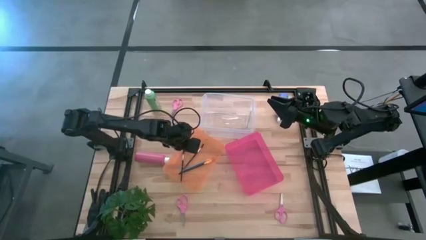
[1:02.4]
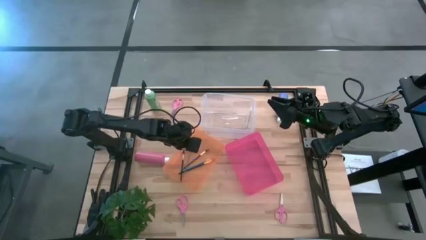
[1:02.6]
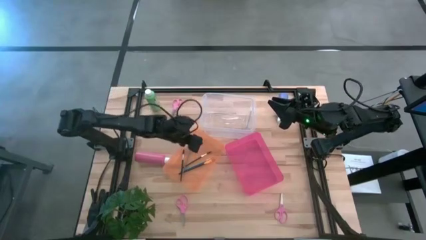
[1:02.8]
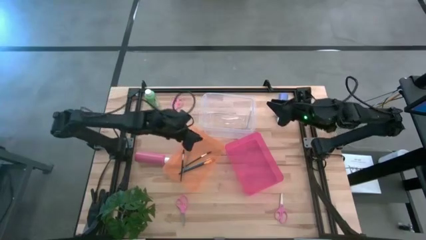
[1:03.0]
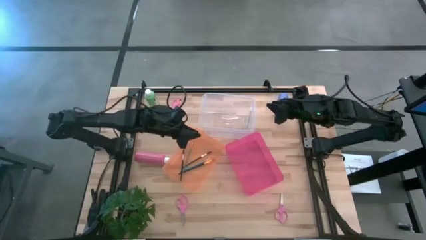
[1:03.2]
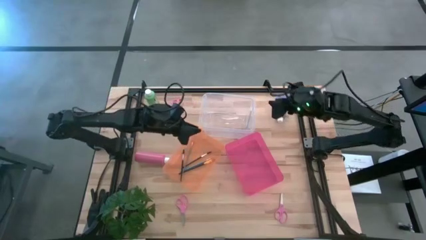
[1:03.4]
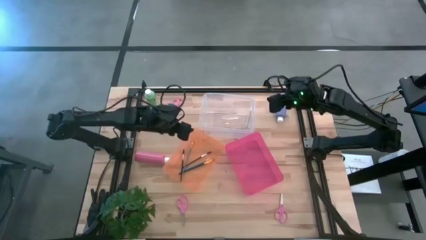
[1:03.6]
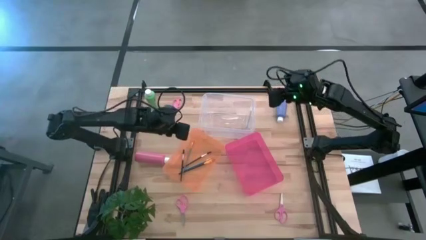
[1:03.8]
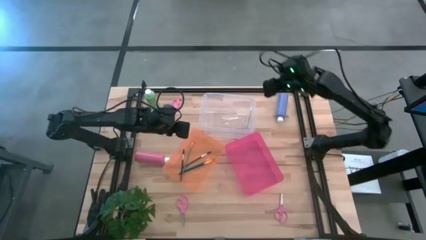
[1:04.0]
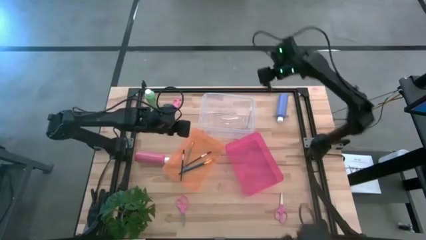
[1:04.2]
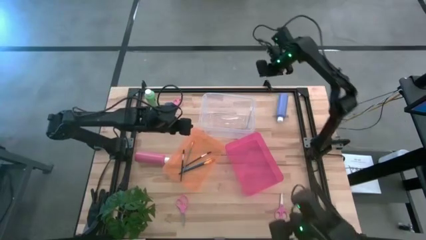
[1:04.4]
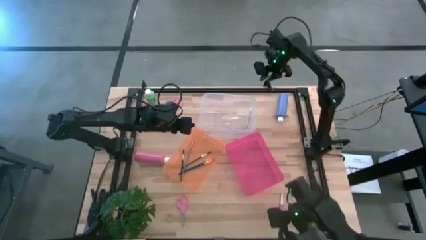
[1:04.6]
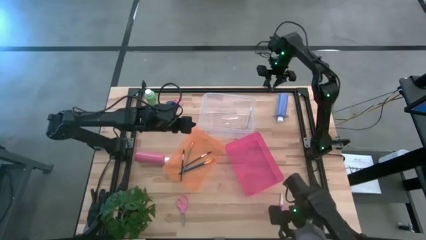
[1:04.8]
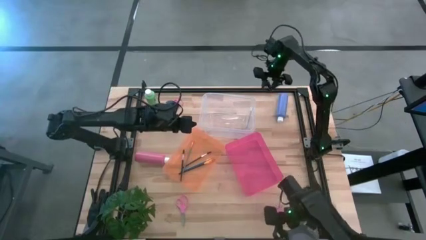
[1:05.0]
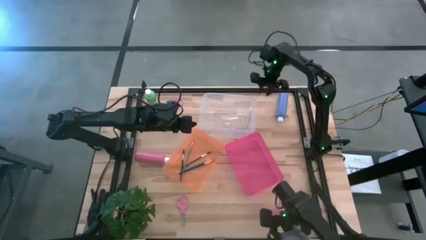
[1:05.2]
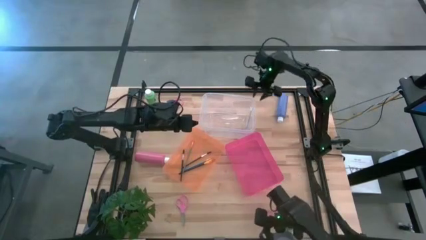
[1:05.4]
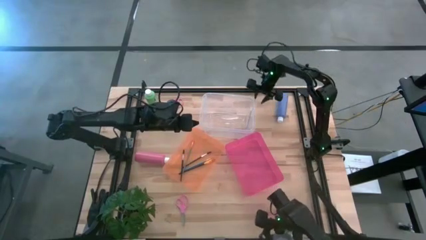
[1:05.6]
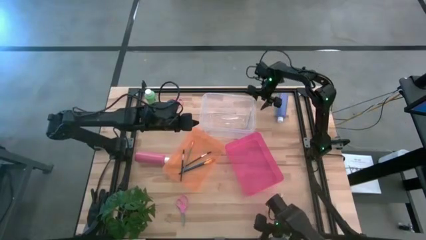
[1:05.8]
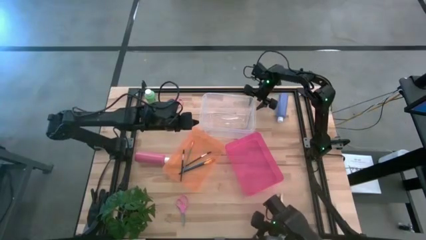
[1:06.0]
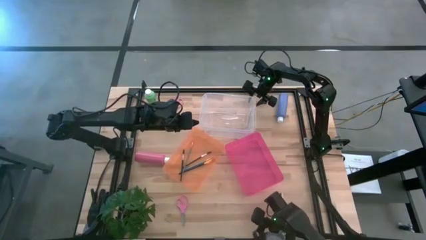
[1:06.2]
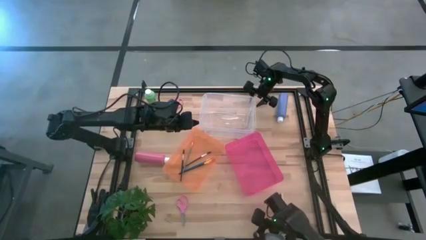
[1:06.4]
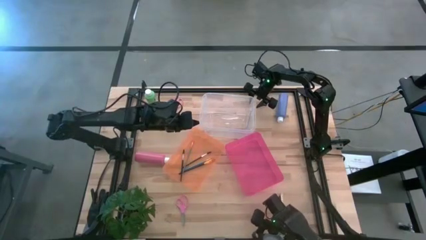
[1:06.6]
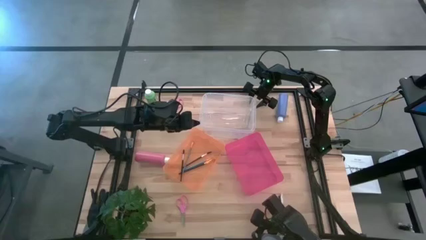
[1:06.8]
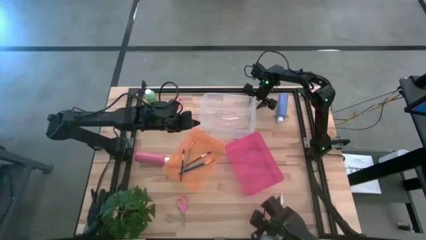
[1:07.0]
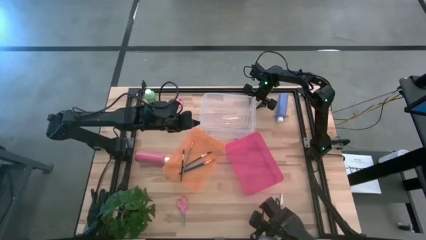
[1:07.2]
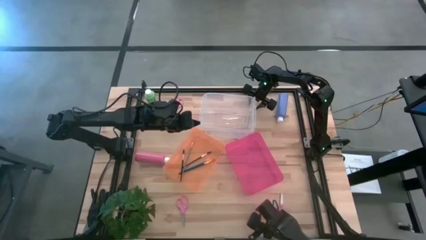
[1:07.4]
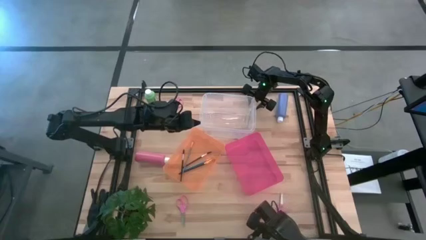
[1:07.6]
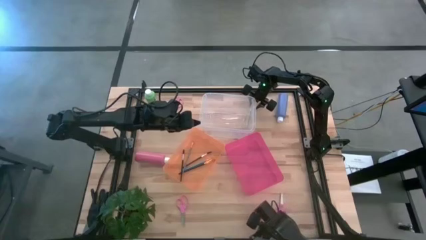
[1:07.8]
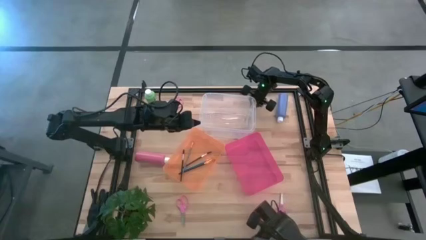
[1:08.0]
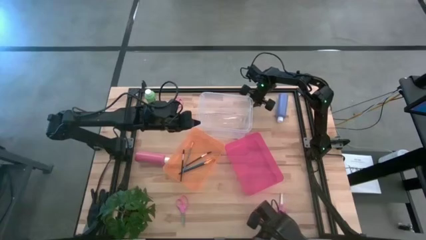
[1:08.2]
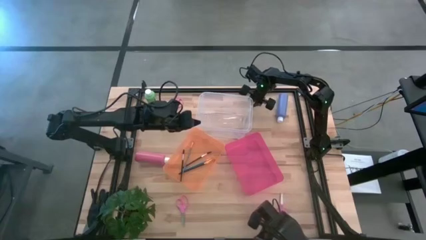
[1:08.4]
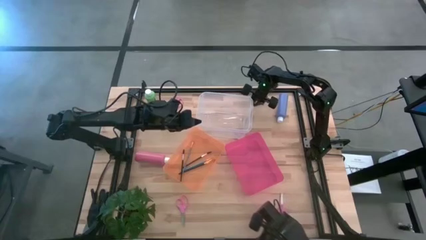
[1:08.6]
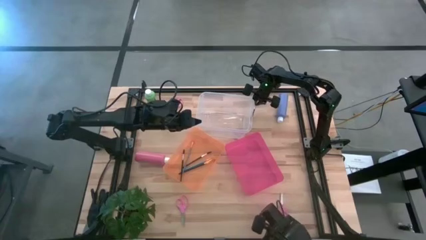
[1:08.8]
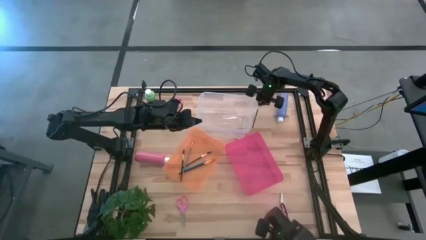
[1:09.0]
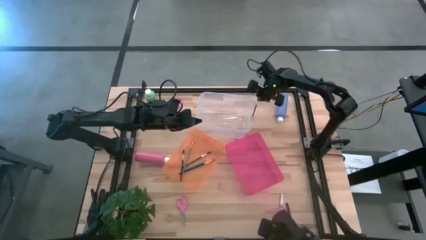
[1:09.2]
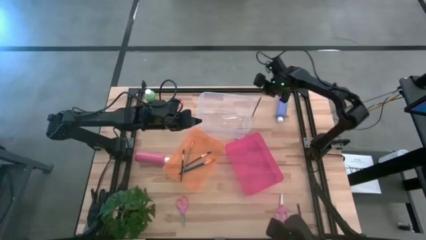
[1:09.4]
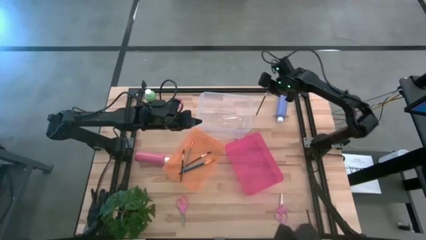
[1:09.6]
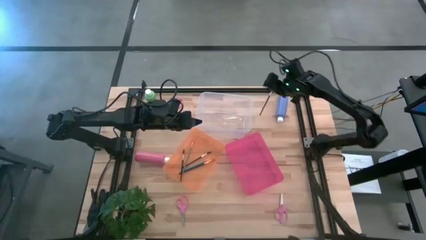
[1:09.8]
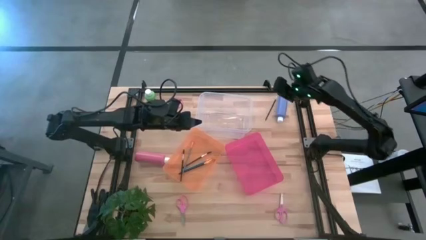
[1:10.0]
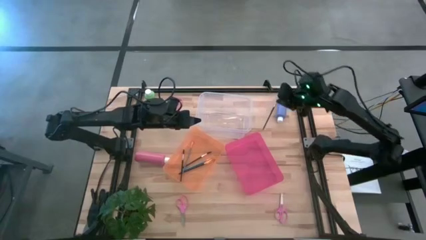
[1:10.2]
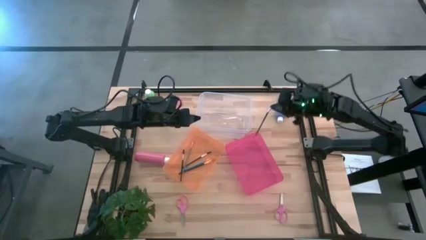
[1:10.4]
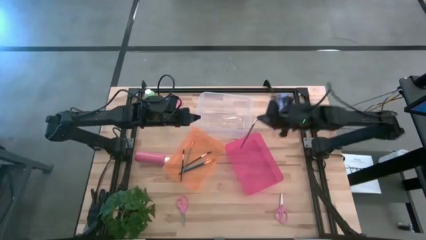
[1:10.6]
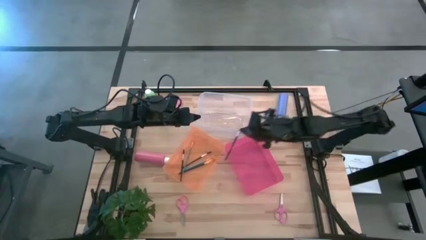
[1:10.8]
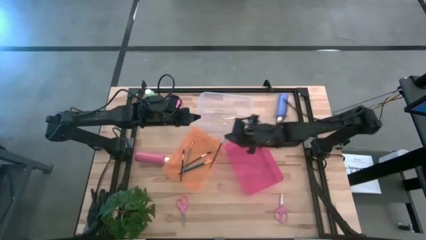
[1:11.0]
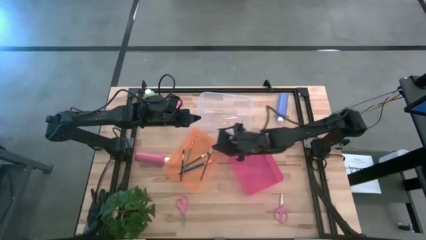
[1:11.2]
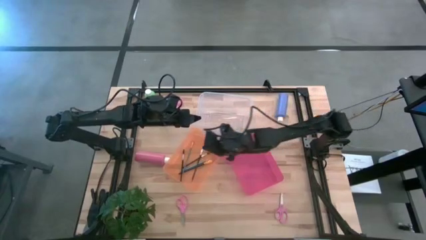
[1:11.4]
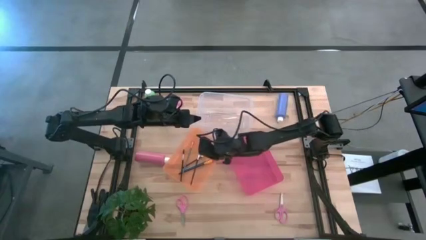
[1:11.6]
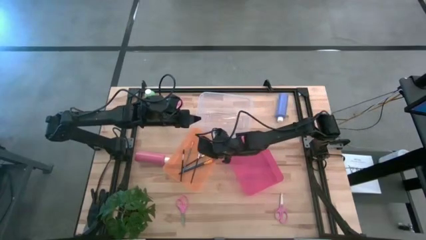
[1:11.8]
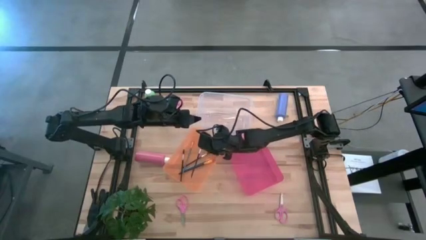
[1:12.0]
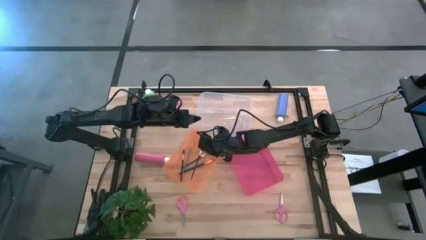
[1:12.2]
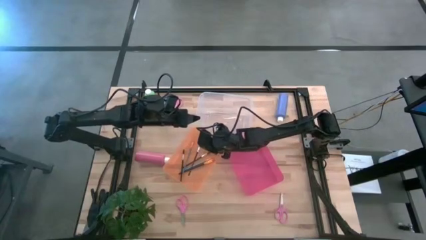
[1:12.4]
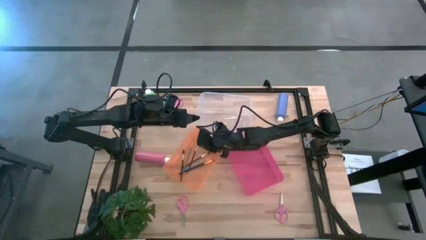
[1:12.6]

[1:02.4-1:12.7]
Task: Pick & Place Paint Supplies
Put the black eyeshadow brush into the orange bin

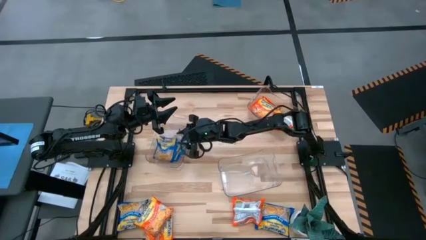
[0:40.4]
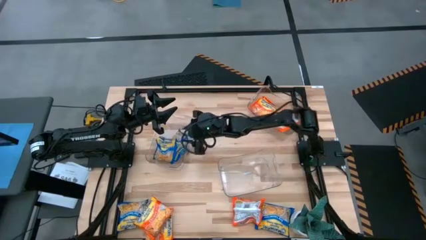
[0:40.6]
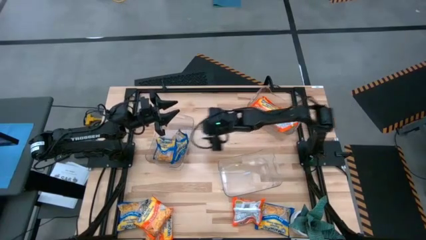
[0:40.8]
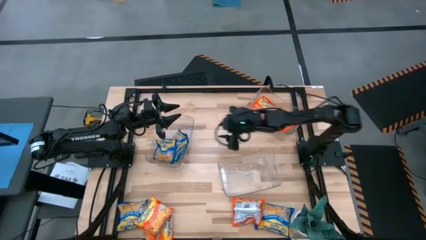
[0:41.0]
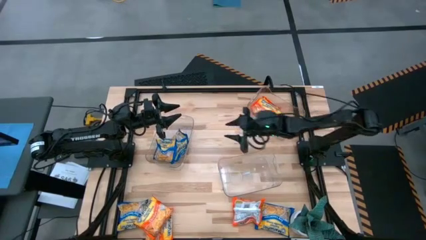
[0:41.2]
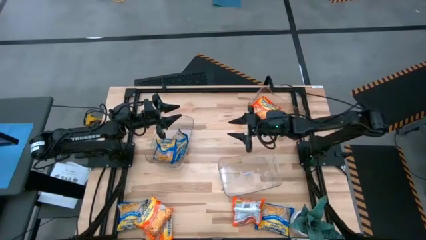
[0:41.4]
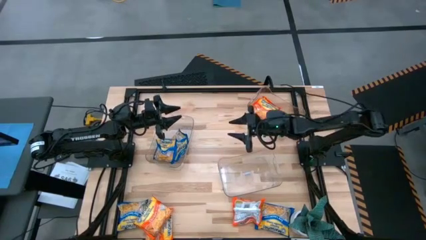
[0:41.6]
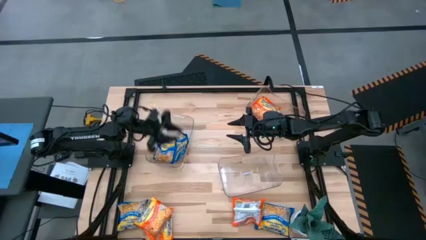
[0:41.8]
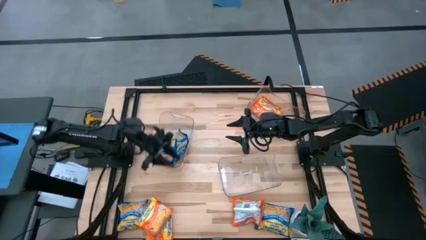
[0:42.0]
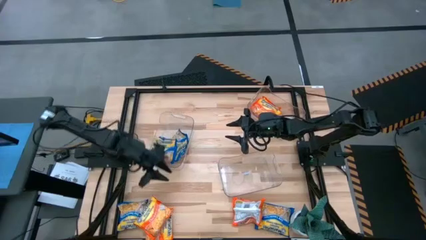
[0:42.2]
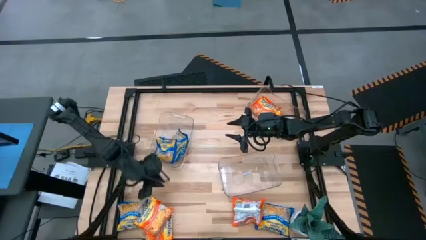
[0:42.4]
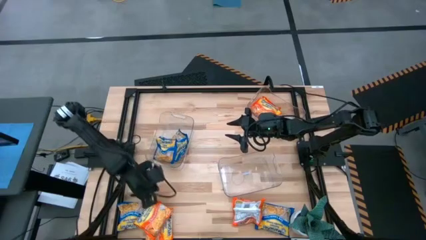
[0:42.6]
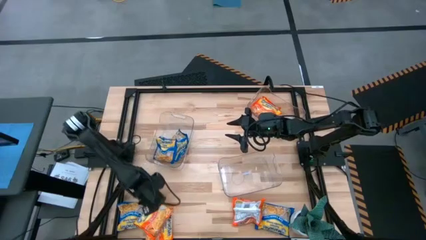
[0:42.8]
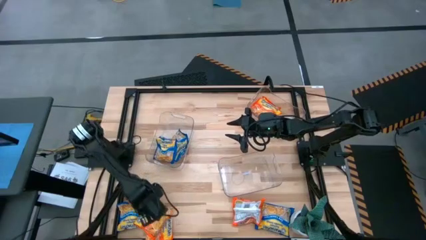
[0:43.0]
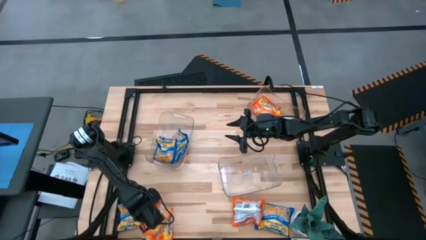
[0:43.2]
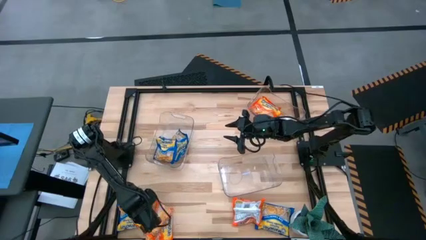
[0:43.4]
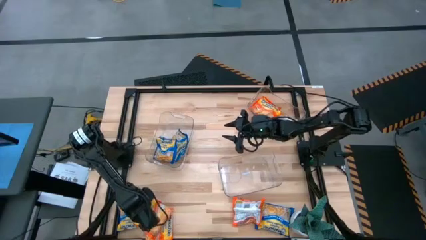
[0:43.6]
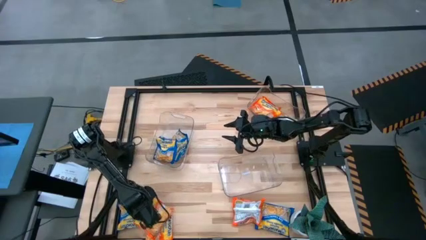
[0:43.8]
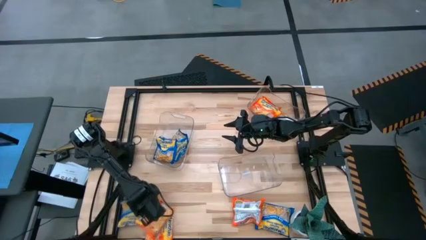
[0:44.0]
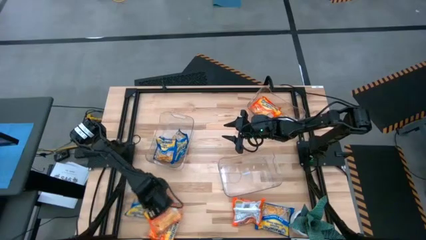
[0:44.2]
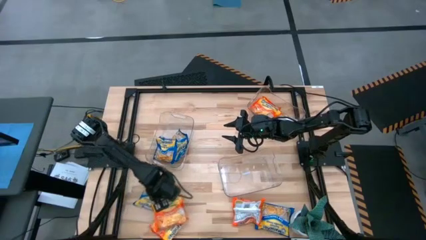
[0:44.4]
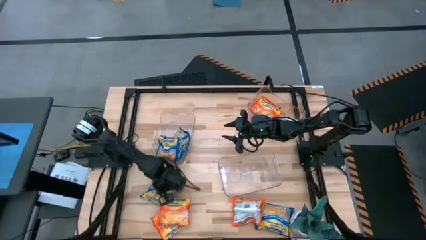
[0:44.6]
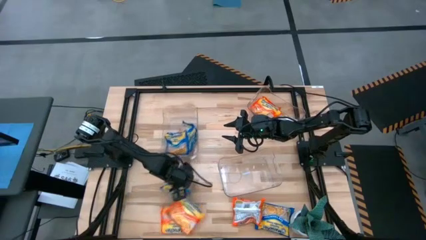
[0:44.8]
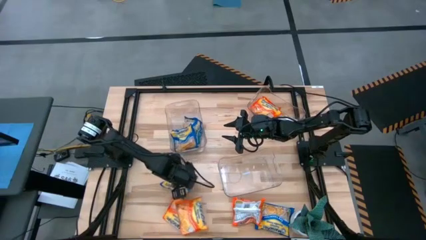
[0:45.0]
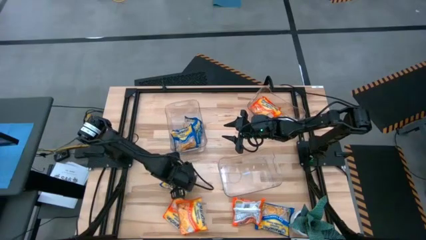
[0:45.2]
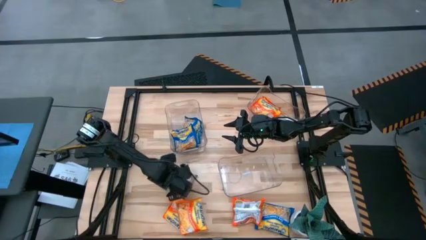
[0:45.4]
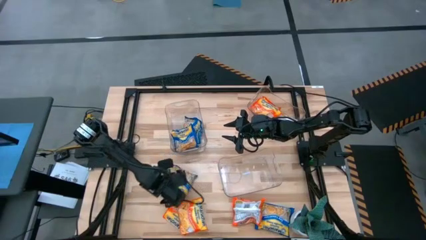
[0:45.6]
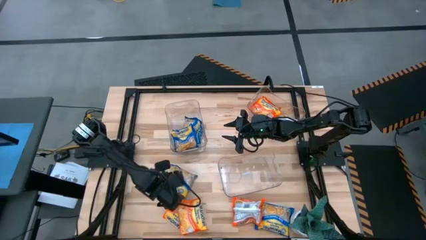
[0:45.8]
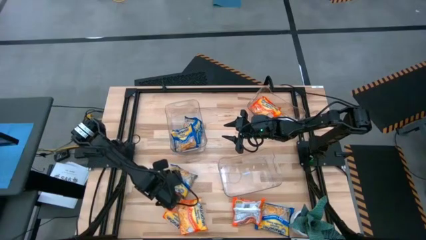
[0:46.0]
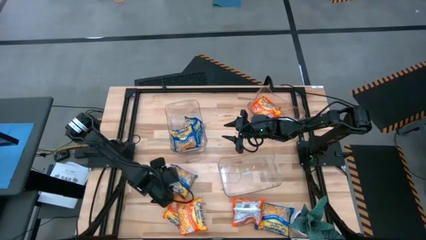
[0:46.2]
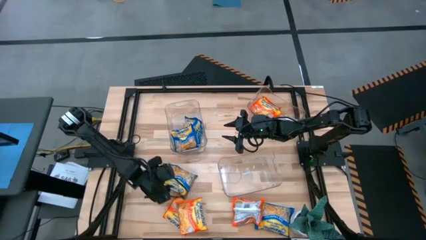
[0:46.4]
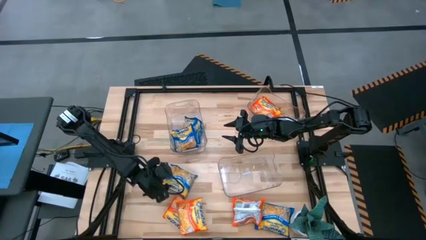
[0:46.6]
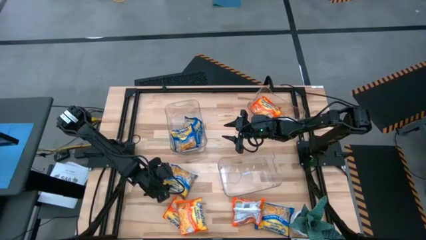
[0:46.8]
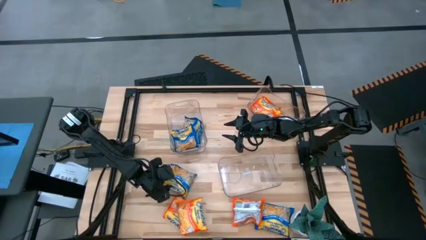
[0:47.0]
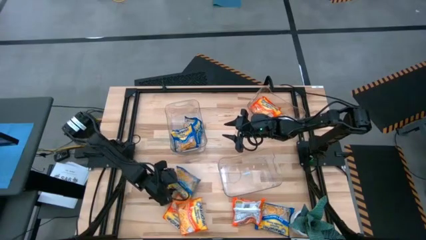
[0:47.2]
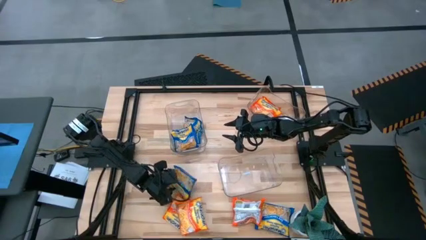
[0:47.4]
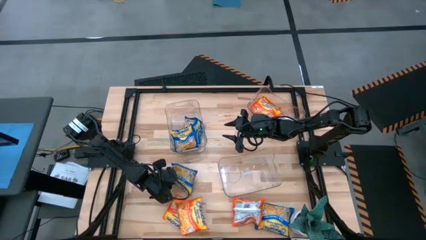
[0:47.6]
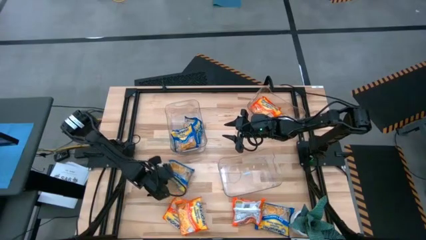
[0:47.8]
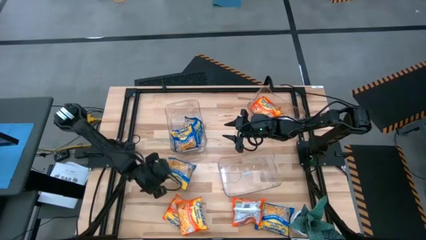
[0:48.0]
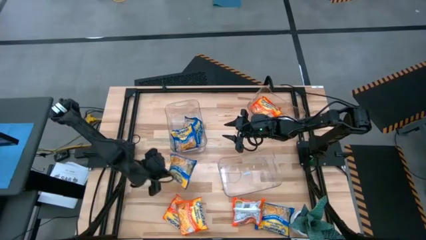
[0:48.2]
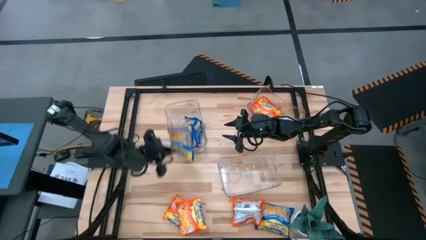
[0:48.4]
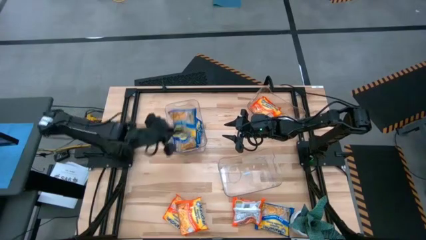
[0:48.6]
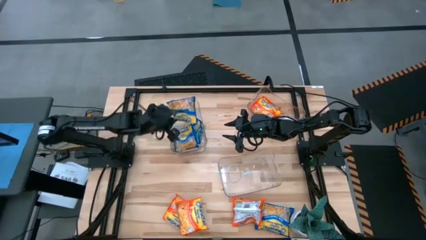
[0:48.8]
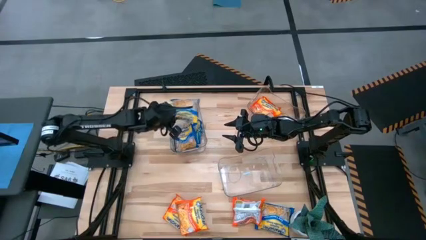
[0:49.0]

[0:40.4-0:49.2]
Task: Sort Maruchan noodles
Put the blue noodle pack into the middle transparent bin
